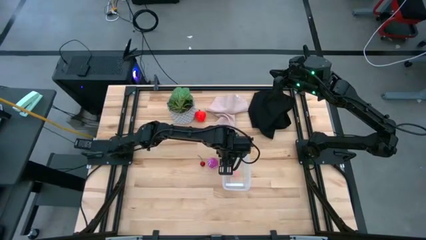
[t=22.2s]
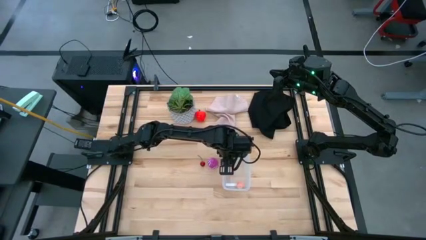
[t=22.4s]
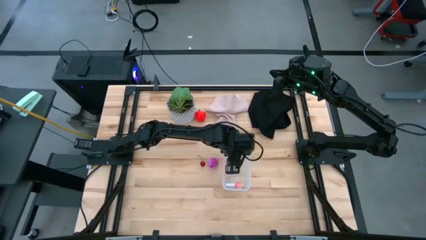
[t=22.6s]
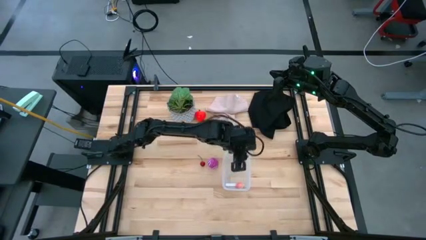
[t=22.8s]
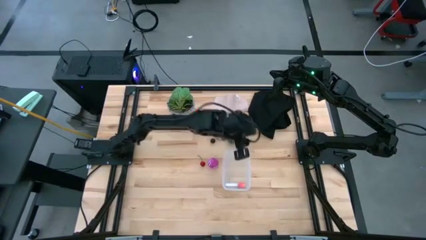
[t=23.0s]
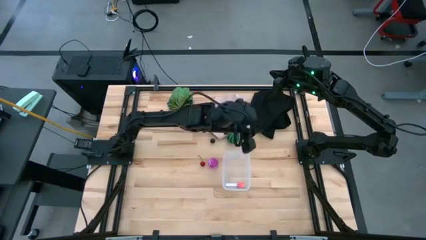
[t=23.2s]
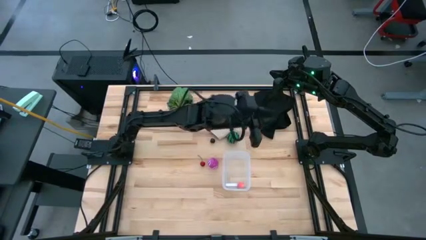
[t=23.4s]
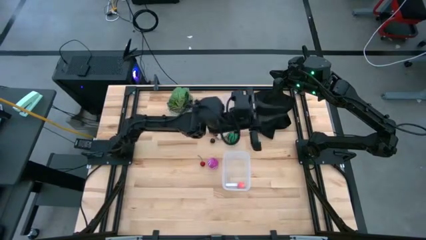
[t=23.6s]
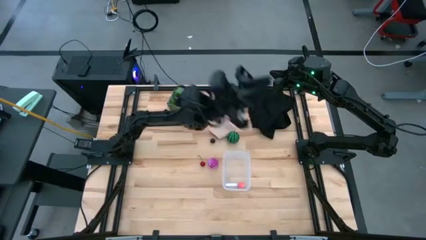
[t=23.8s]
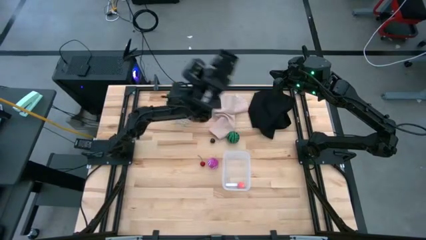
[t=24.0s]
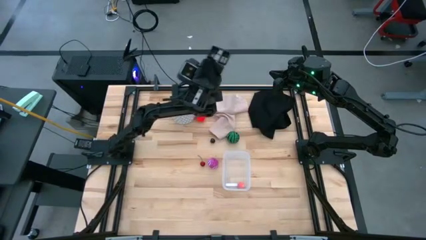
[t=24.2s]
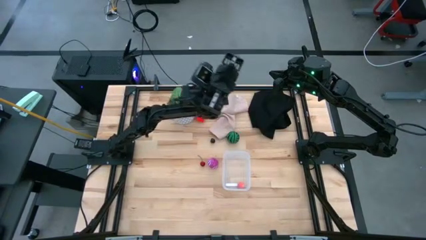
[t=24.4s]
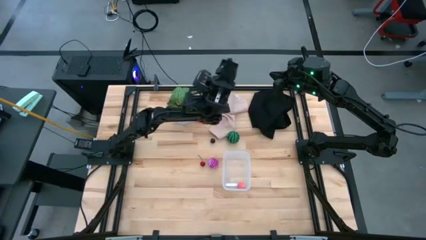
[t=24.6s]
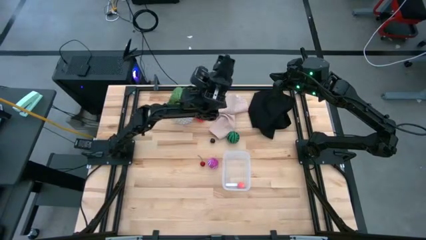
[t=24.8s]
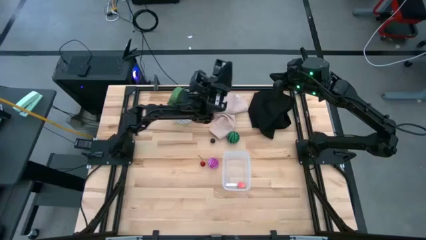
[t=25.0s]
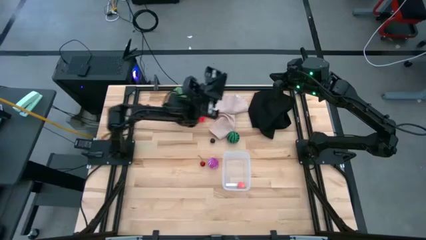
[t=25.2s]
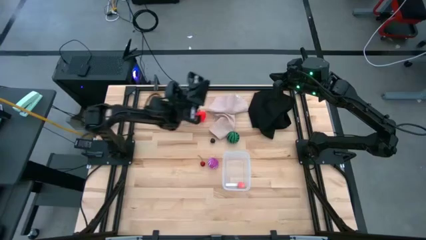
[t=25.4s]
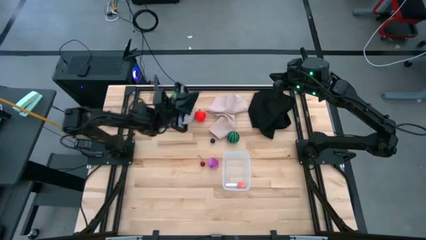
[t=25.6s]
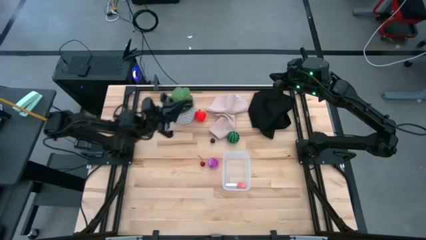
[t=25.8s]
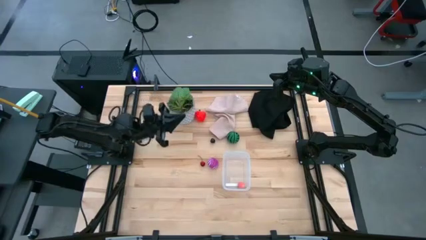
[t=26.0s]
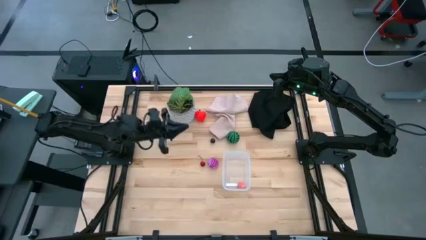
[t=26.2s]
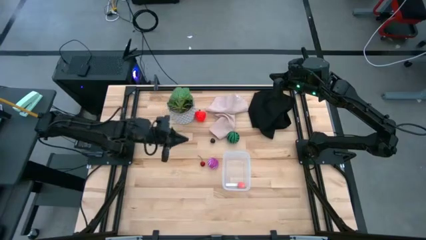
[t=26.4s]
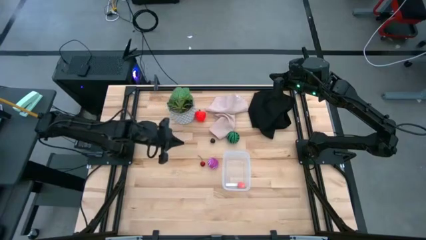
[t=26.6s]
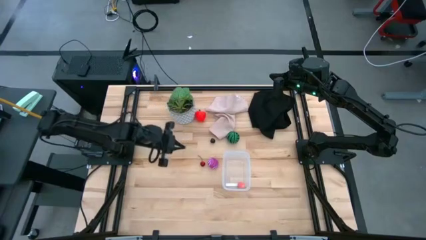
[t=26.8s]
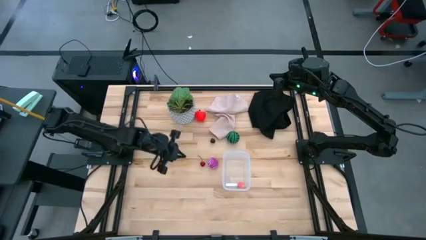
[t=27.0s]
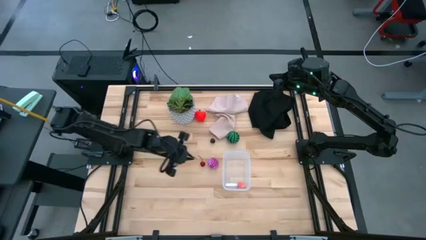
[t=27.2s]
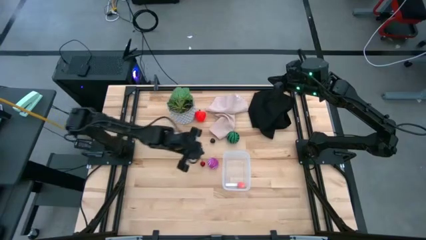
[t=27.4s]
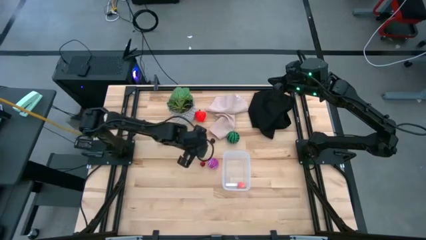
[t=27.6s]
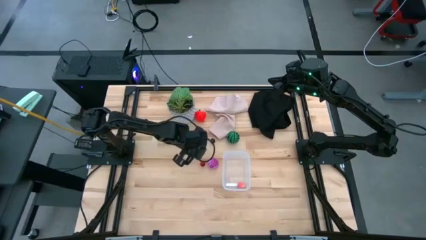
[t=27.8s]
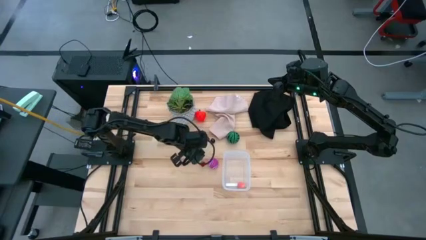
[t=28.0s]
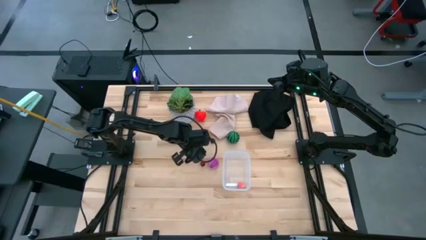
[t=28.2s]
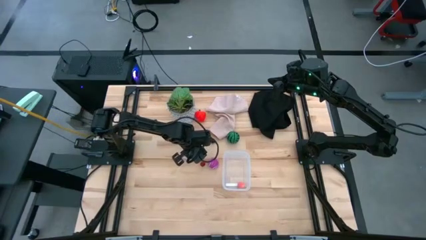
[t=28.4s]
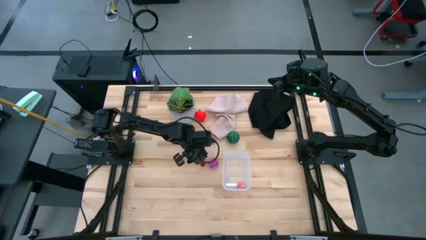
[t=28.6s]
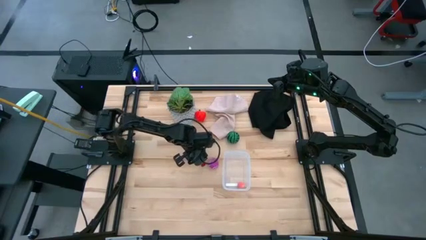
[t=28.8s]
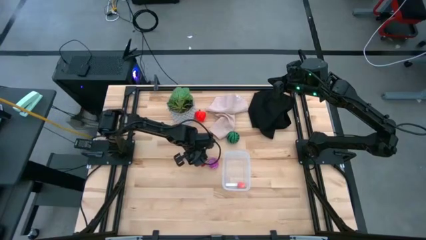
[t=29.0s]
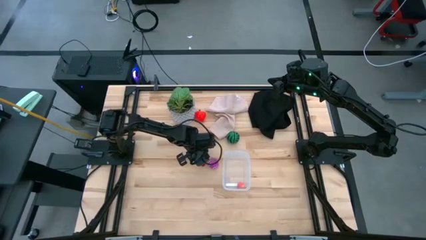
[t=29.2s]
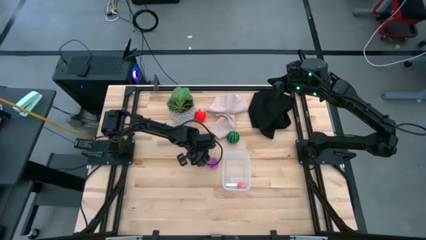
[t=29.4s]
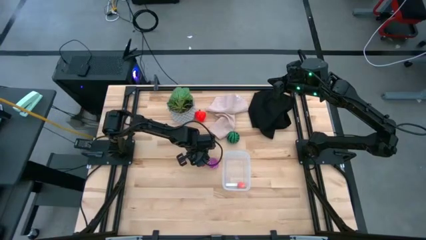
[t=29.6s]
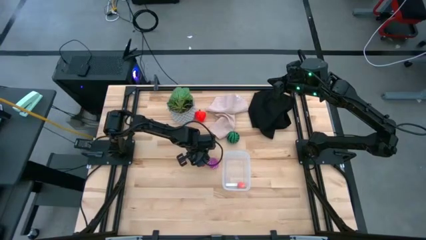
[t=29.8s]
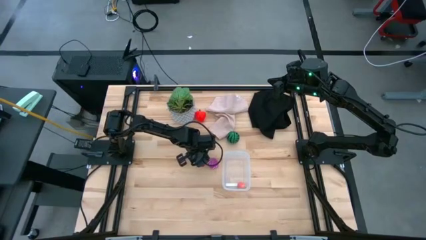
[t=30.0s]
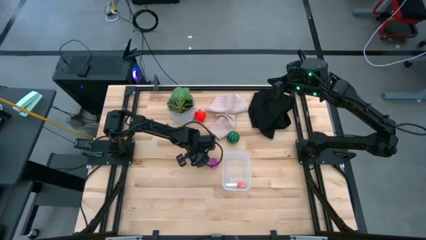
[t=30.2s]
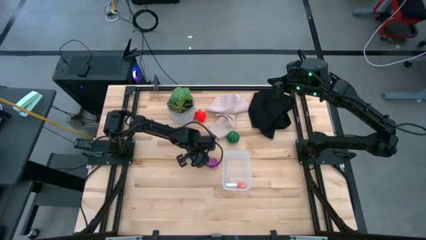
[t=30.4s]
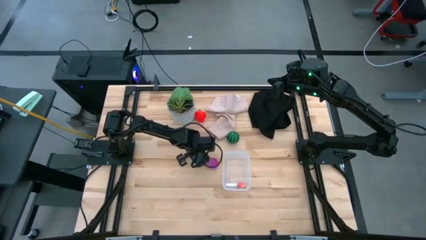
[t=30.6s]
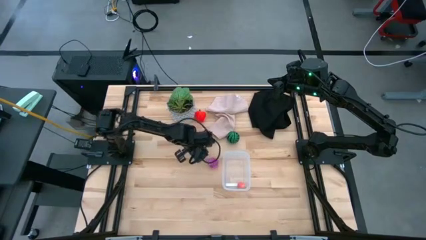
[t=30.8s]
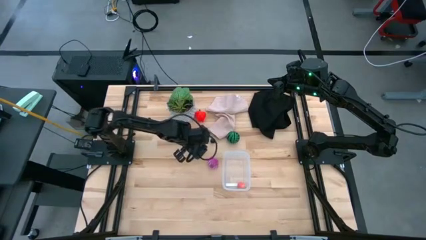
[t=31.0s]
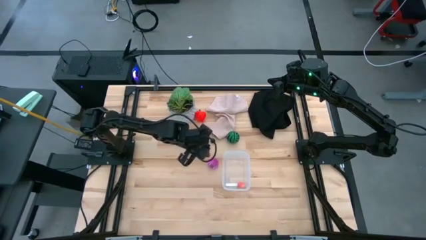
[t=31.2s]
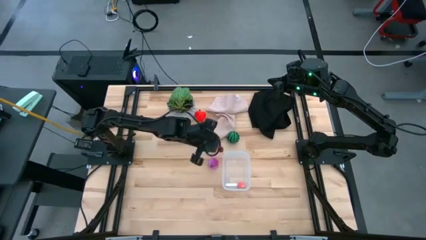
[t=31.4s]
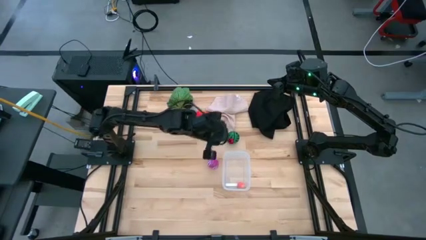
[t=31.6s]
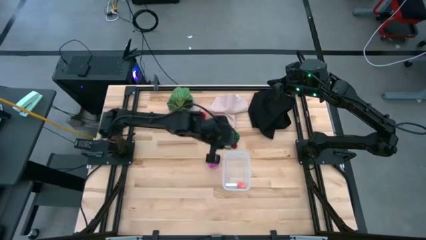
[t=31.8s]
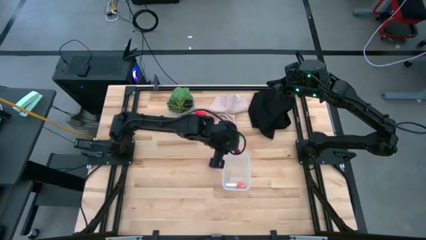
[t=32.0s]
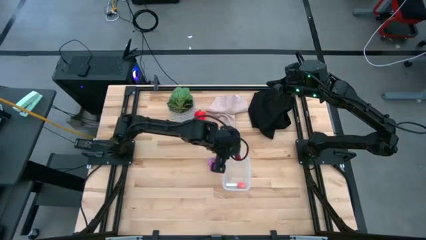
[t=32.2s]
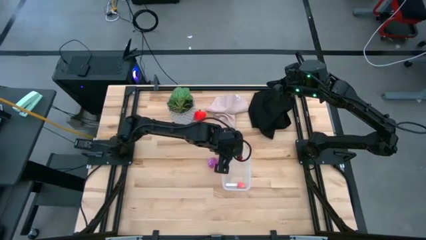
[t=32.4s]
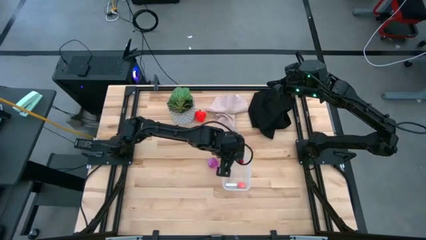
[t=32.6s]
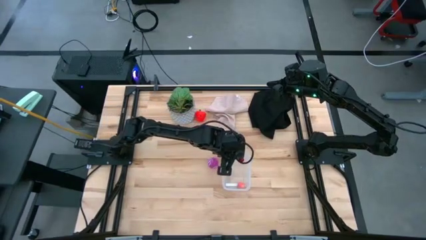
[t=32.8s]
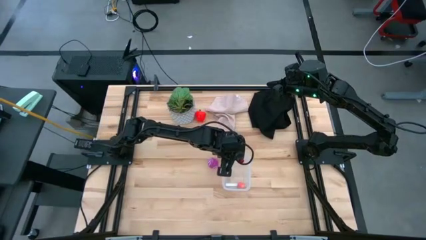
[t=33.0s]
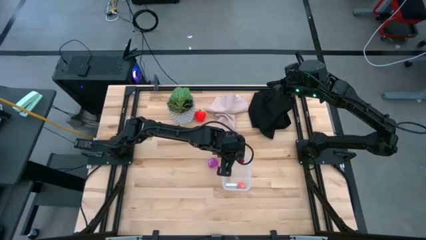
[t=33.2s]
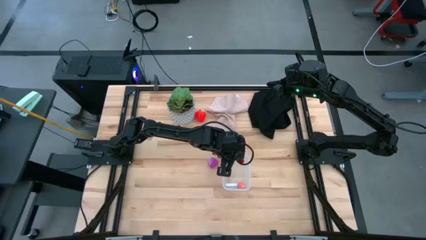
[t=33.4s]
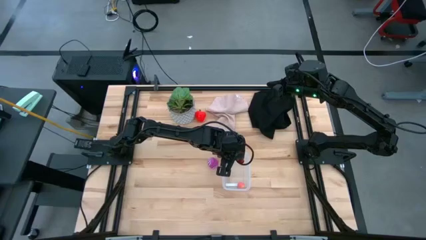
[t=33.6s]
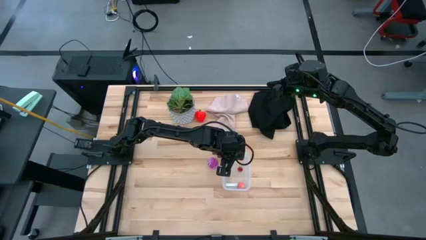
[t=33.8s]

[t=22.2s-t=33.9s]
Task: Pick and placing Produce into tupperware
Put the red cherry into the transparent bin
